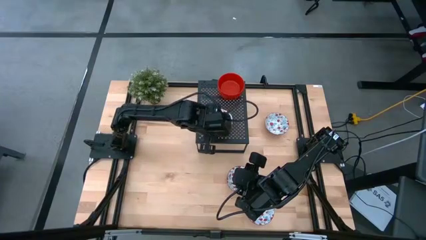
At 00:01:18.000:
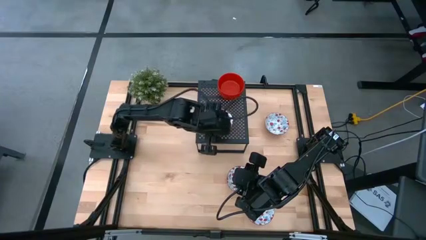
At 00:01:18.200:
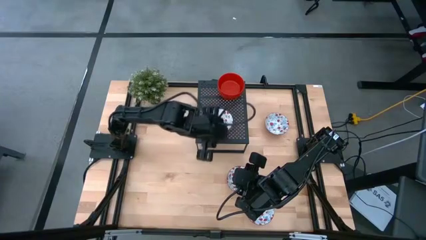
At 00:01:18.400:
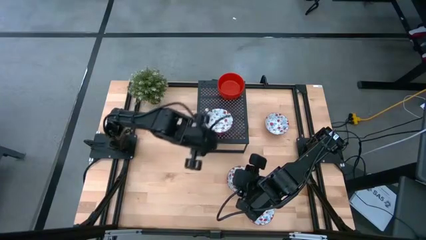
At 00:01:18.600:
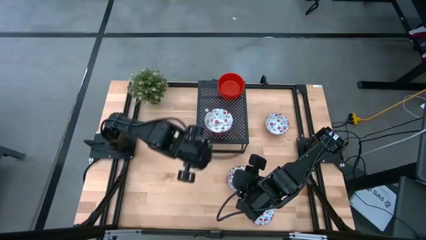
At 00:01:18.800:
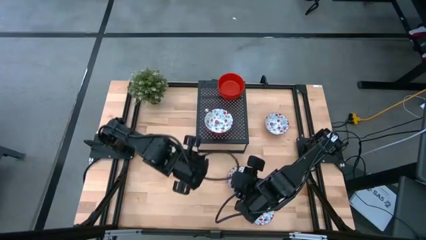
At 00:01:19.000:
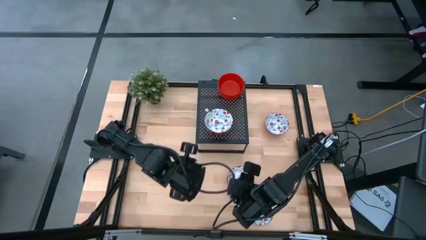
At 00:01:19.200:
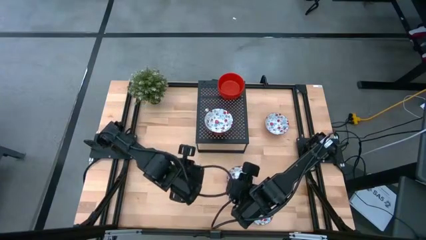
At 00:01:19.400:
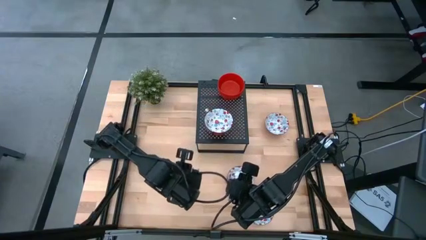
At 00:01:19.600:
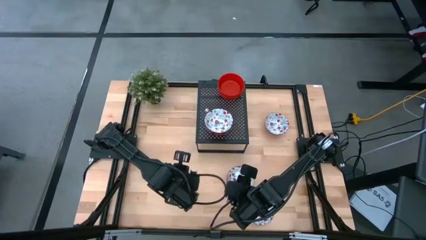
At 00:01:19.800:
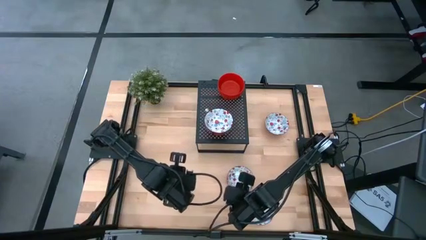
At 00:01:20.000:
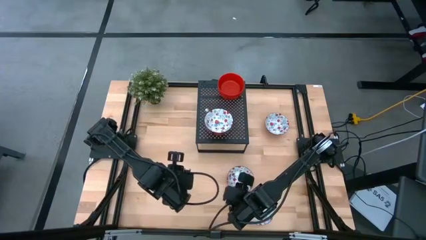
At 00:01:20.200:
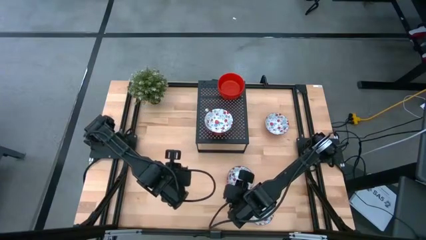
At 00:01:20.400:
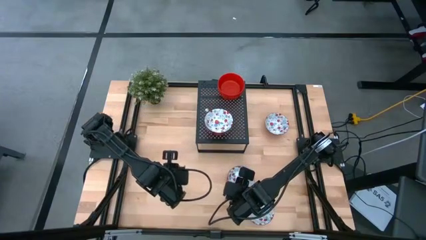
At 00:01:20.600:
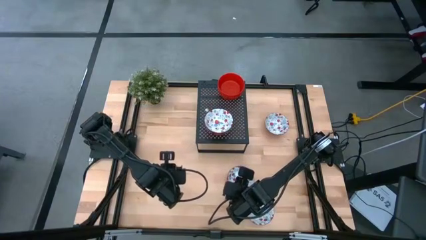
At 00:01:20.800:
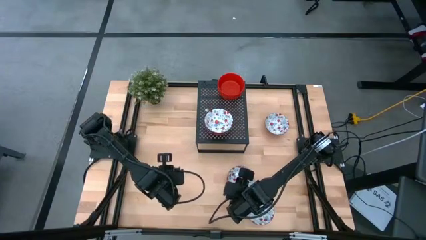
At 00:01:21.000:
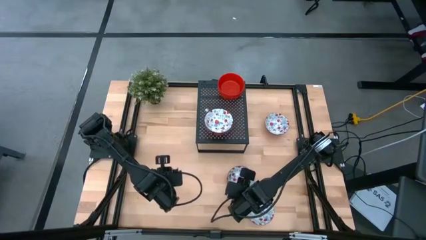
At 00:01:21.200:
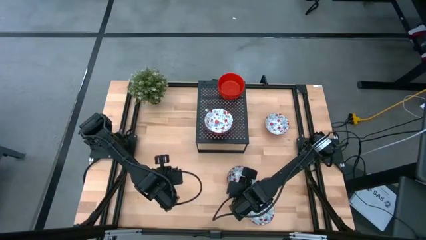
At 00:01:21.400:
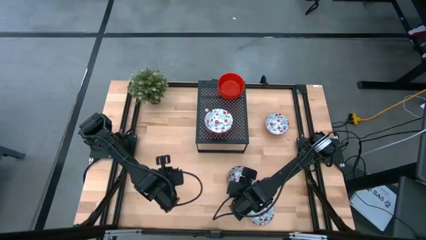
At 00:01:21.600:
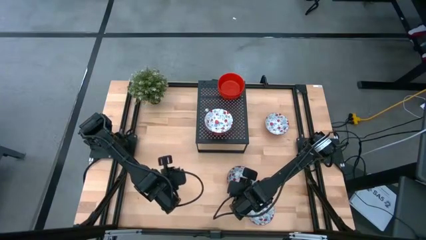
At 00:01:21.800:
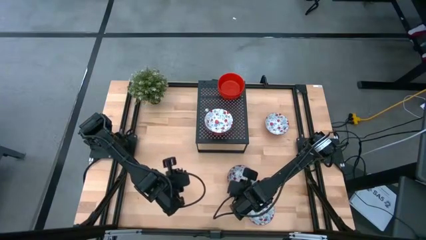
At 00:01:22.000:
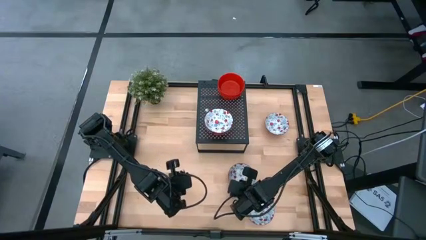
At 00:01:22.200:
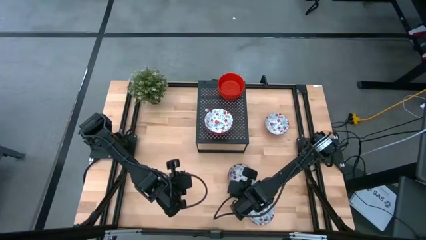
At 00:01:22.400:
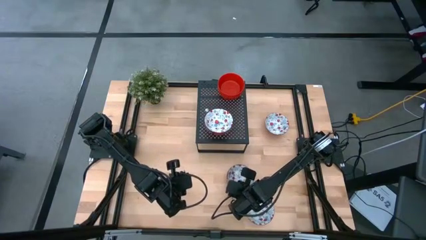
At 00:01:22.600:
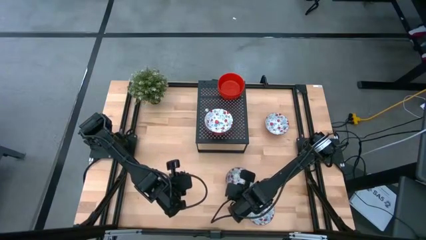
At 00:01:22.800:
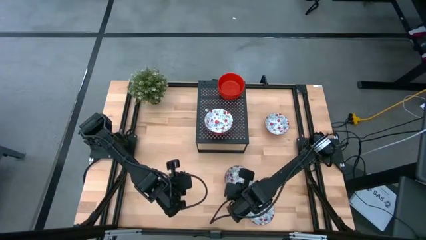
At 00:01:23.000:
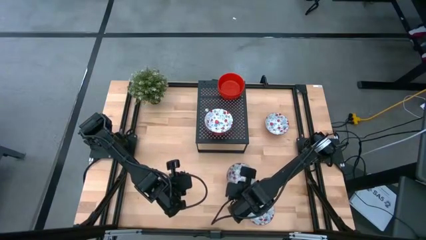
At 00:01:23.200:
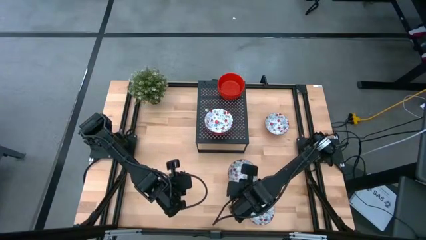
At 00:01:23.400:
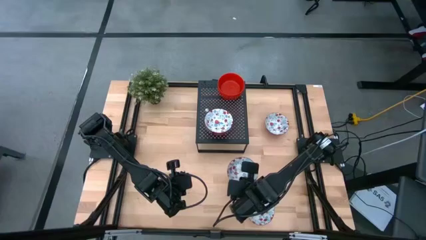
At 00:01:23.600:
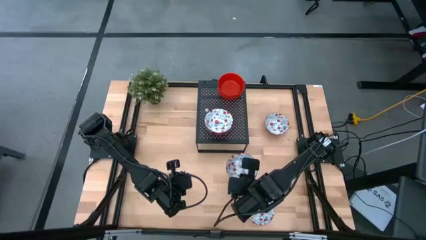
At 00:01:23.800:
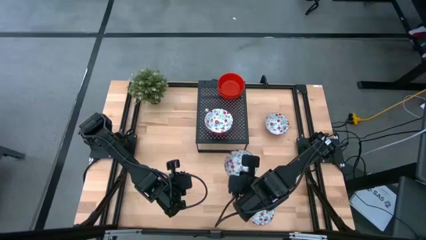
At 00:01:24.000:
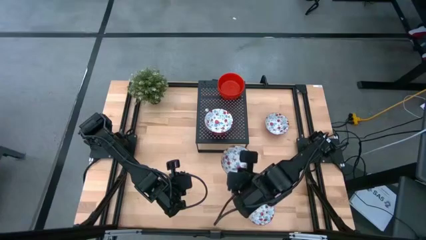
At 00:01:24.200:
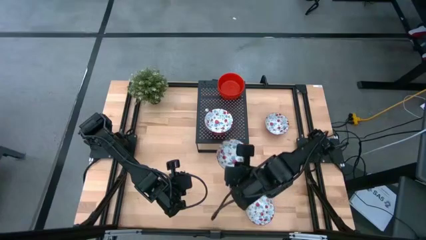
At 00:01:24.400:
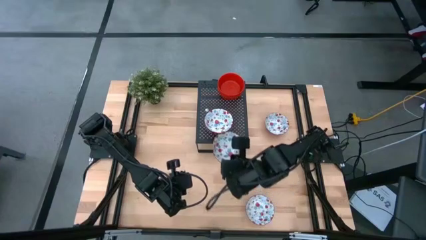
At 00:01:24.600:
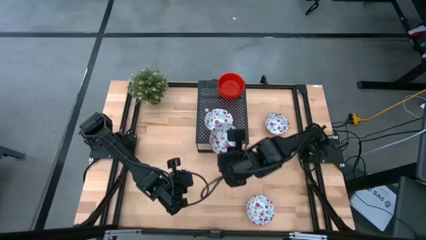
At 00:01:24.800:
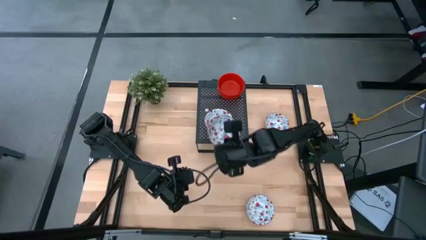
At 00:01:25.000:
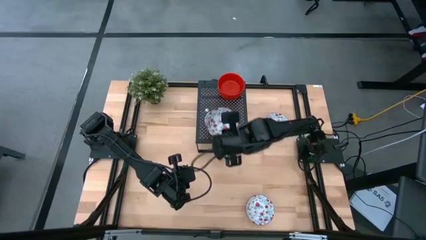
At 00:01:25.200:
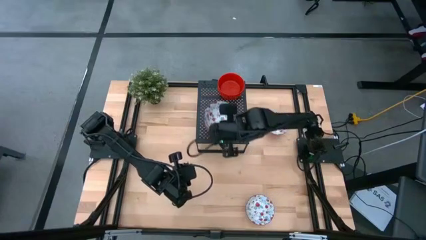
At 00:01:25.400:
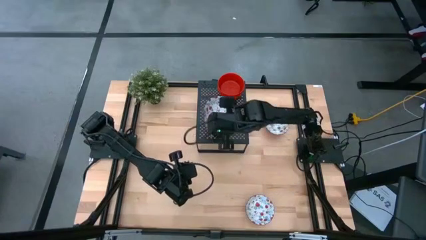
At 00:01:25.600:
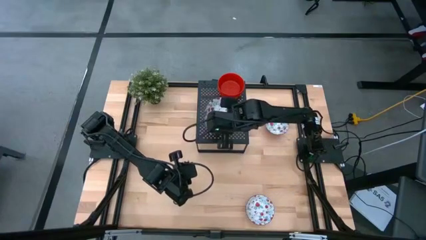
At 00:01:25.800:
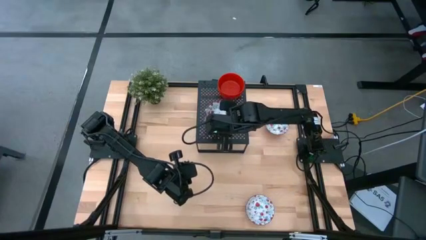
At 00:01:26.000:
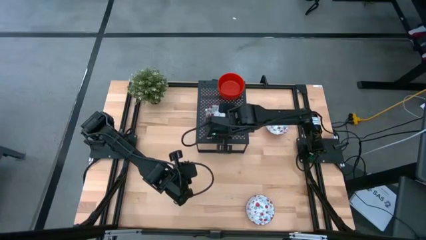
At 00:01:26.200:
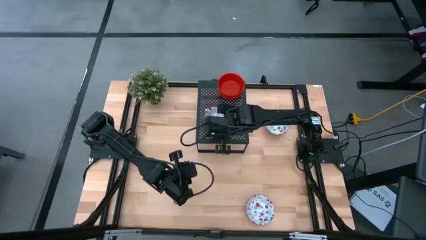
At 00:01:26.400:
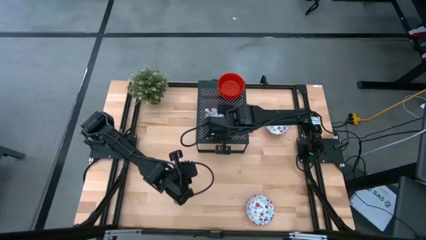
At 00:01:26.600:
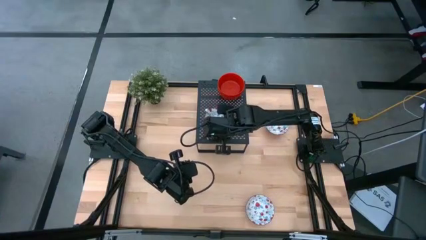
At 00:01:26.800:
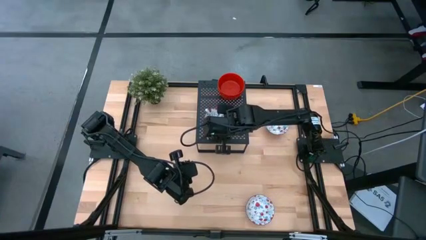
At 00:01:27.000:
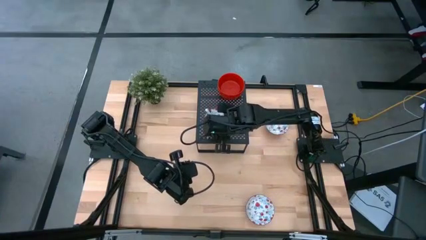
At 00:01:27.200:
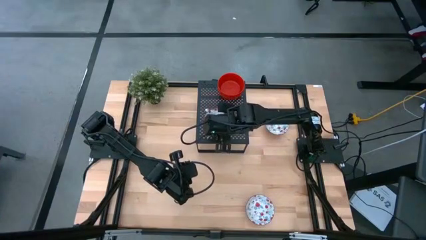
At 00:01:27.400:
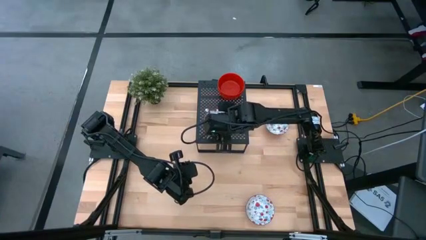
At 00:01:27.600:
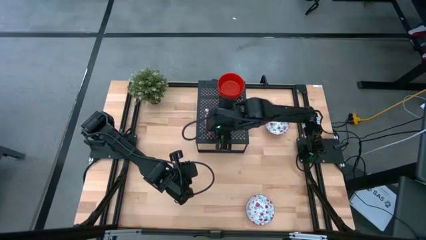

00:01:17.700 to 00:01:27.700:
Task: Pick & Place Mini bowls
Stack the middle white patterned bowl on top of the other white patterned bowls on the shelf
